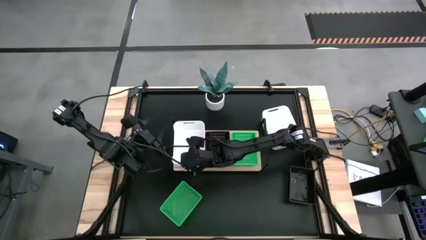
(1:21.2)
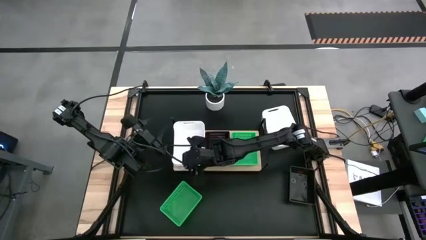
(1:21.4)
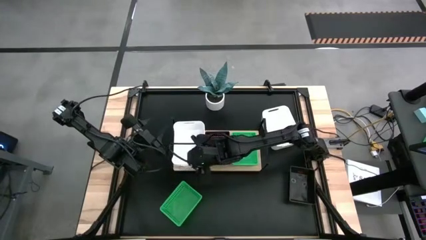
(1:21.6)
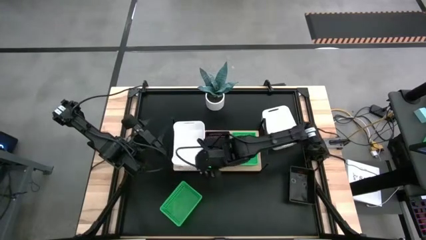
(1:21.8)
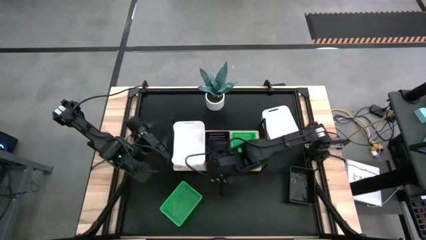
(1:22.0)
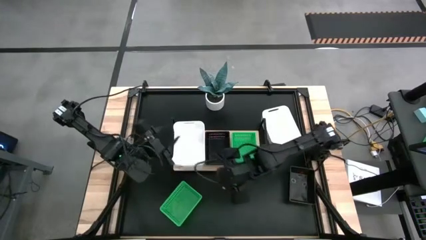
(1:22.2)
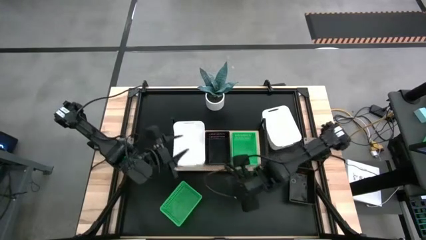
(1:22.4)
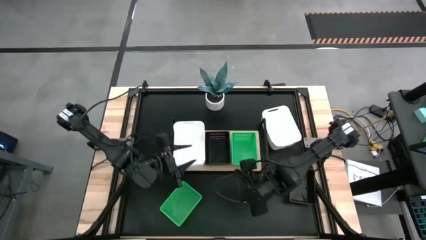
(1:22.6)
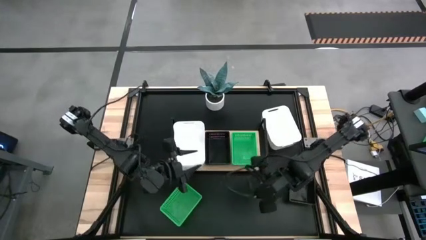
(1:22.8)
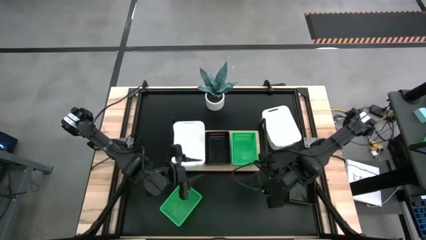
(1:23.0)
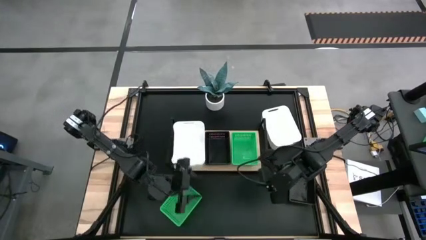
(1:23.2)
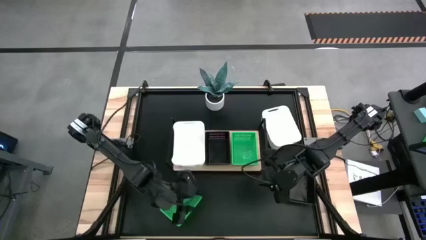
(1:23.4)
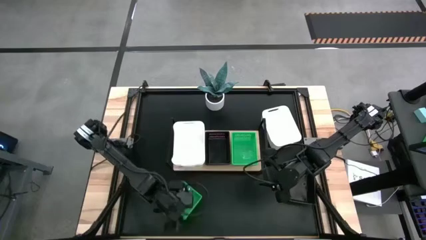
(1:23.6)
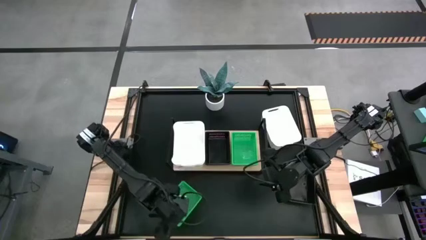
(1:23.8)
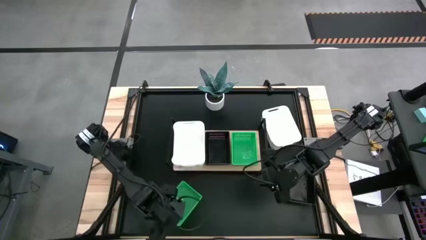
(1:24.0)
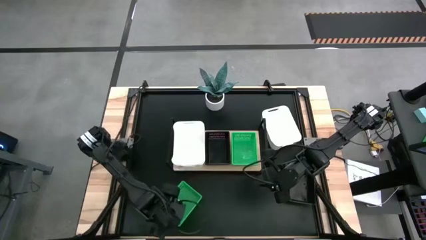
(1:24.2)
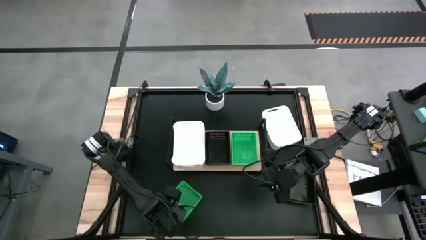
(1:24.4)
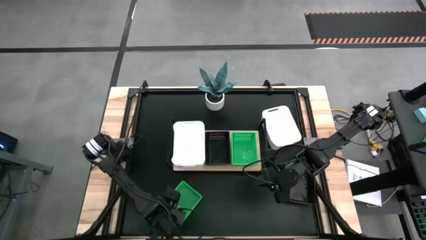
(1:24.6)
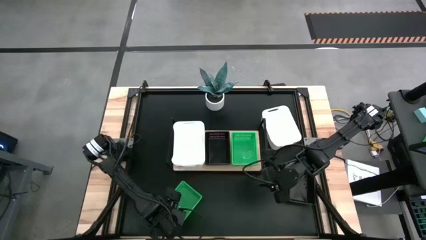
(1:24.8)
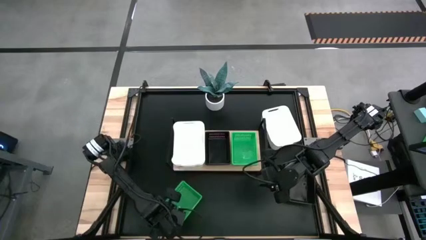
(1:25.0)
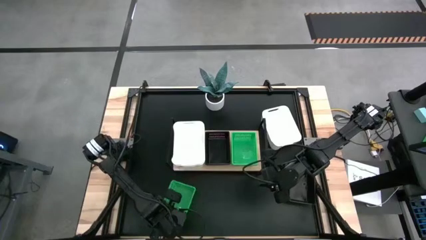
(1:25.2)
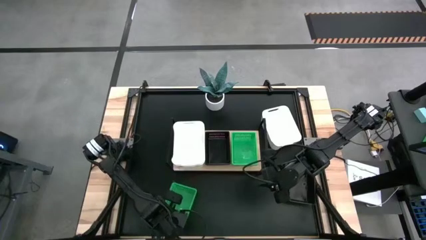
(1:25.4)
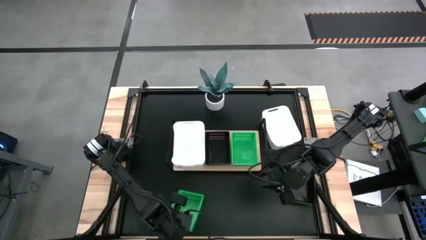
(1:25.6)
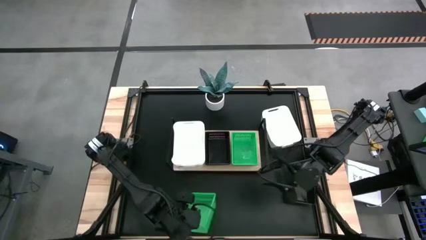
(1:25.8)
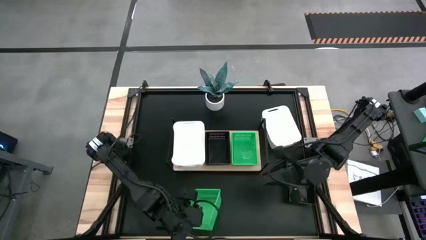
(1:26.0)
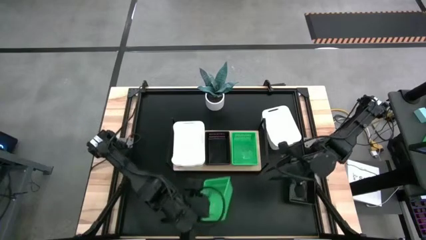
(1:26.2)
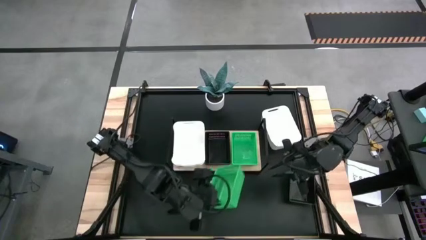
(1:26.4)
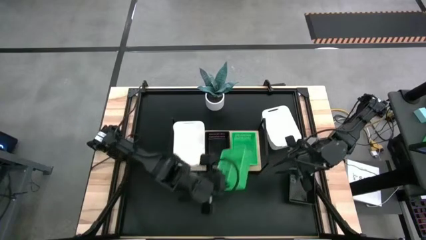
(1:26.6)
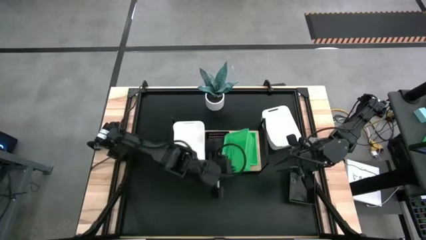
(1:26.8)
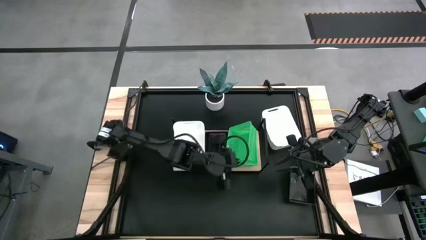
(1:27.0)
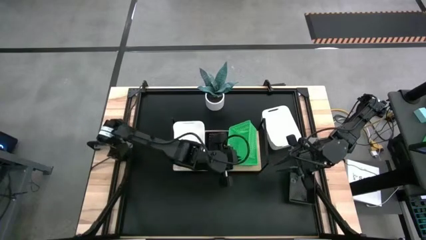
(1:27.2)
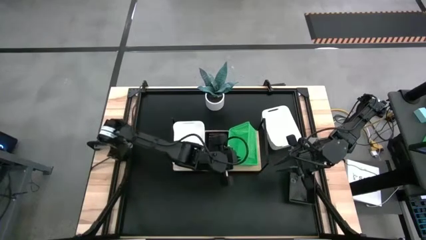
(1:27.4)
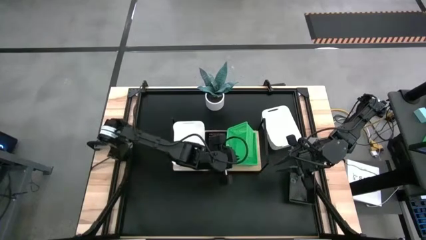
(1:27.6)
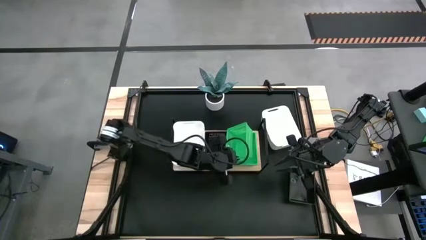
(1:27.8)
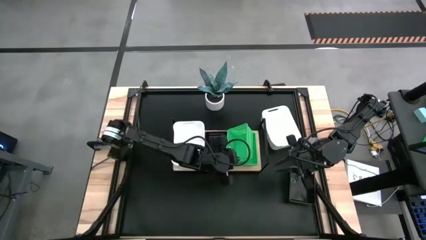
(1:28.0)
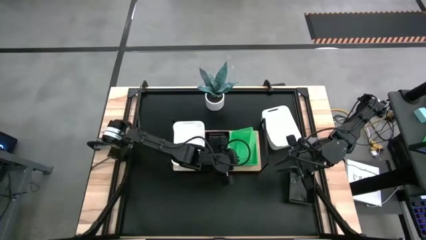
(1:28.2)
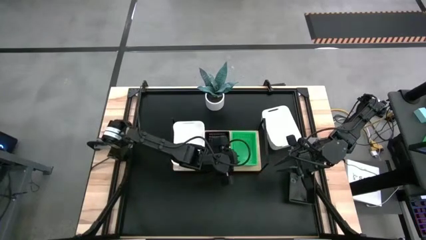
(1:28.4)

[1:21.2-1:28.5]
Task: Stack baskets on shelf by color
Stack the green bin on top of the other green bins on the shelf

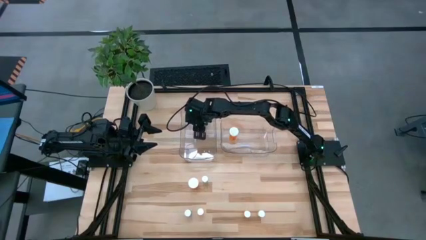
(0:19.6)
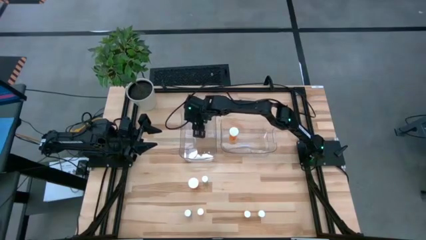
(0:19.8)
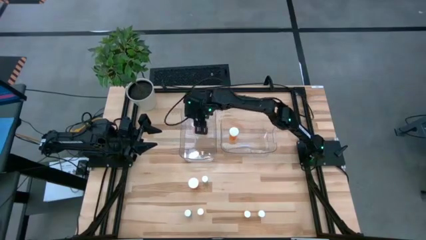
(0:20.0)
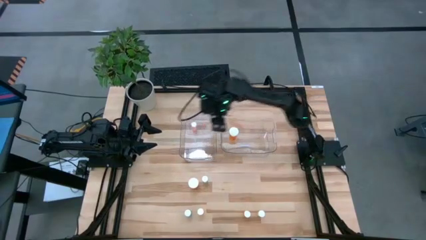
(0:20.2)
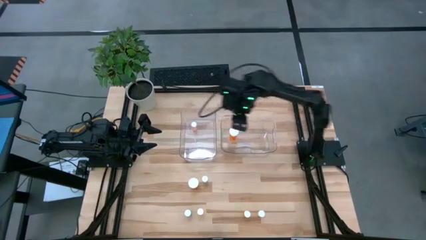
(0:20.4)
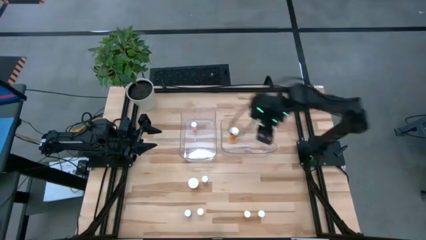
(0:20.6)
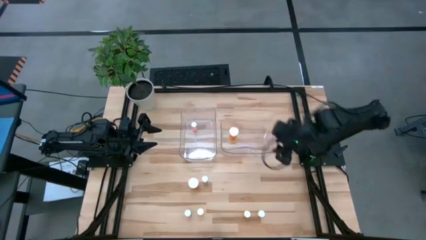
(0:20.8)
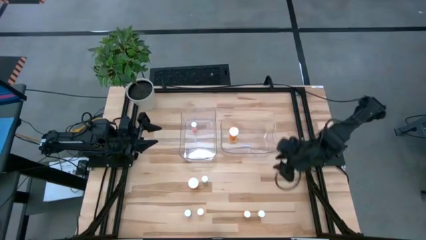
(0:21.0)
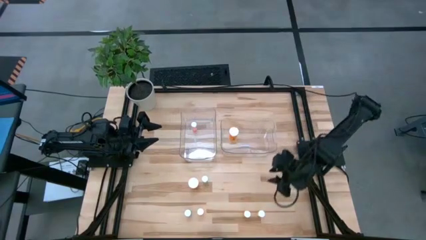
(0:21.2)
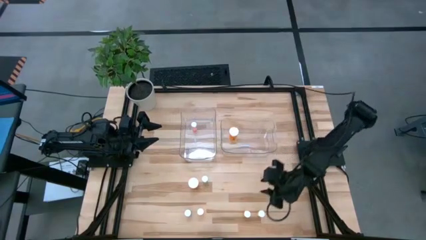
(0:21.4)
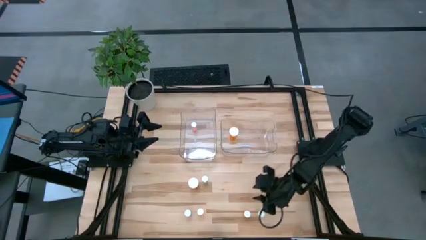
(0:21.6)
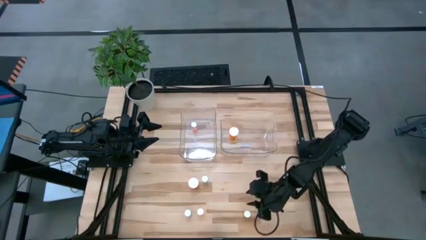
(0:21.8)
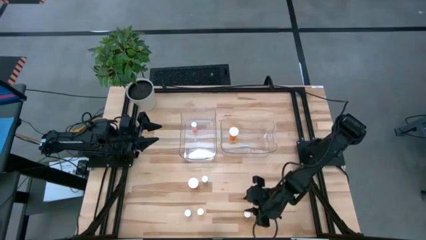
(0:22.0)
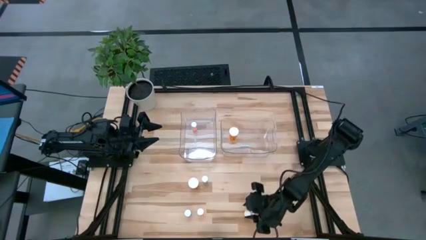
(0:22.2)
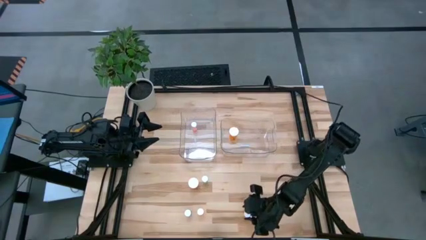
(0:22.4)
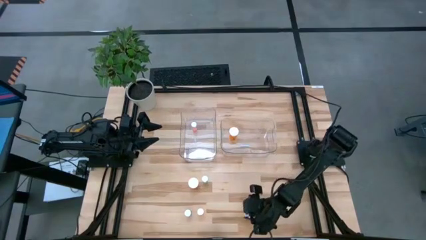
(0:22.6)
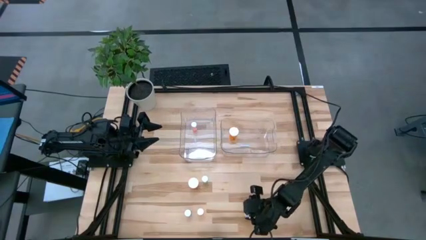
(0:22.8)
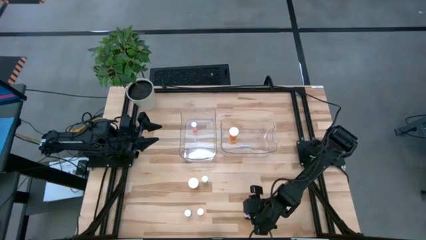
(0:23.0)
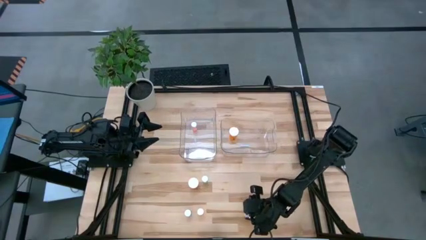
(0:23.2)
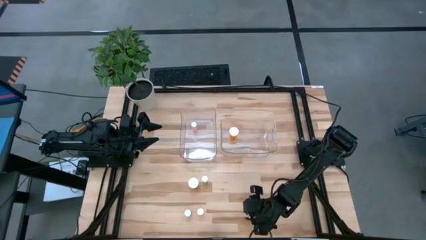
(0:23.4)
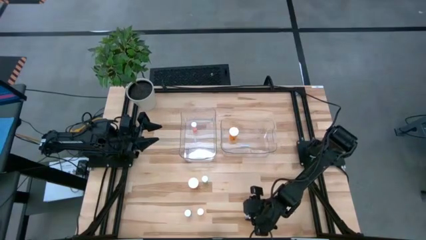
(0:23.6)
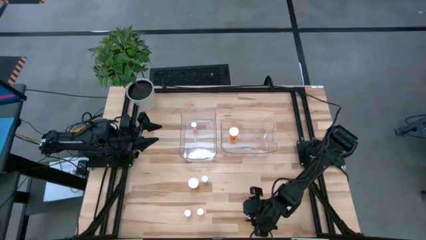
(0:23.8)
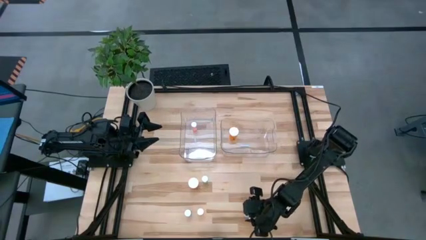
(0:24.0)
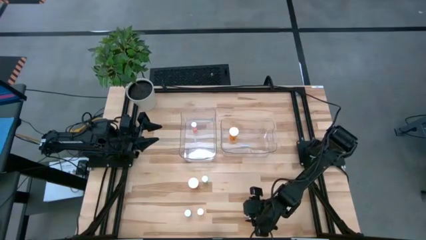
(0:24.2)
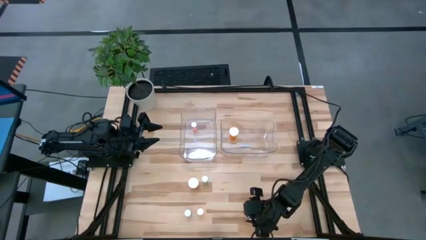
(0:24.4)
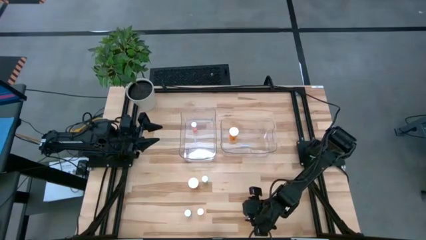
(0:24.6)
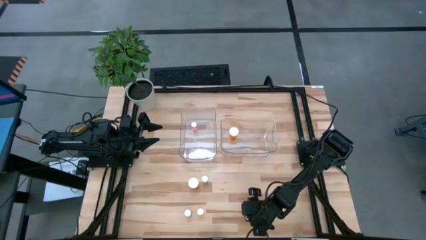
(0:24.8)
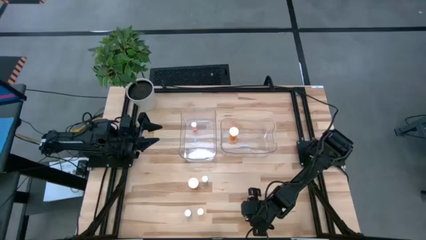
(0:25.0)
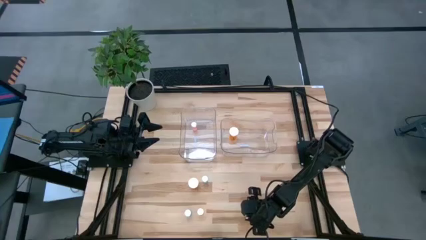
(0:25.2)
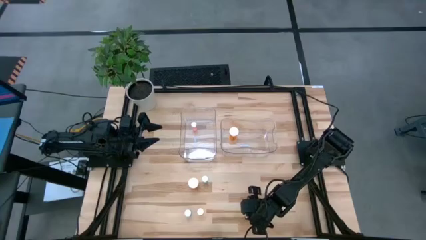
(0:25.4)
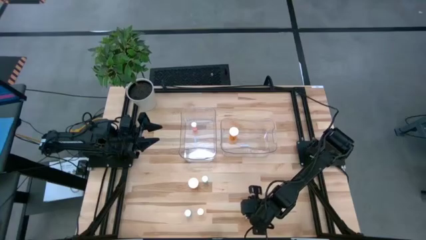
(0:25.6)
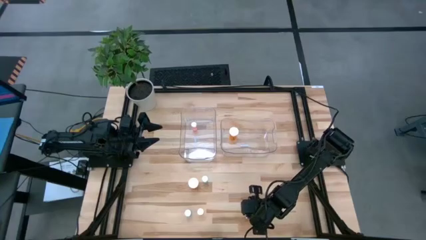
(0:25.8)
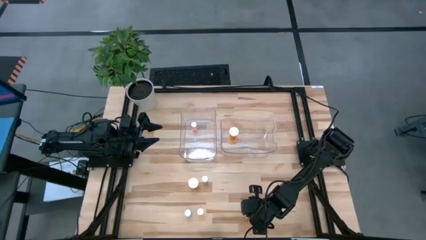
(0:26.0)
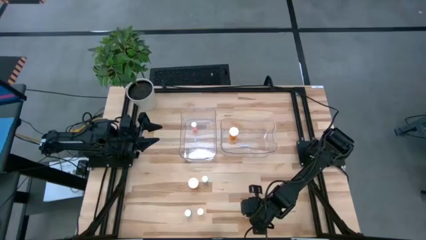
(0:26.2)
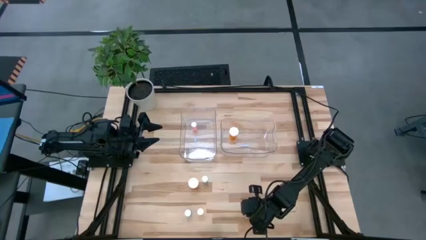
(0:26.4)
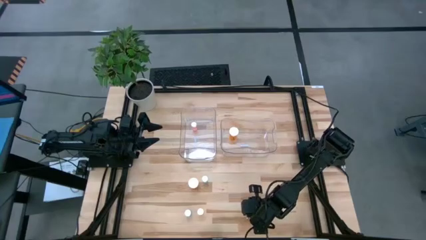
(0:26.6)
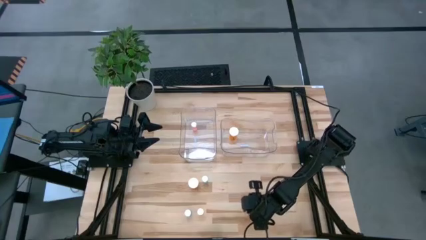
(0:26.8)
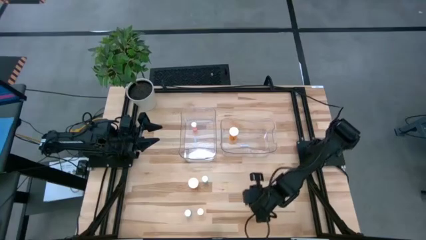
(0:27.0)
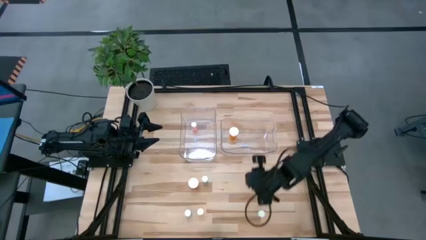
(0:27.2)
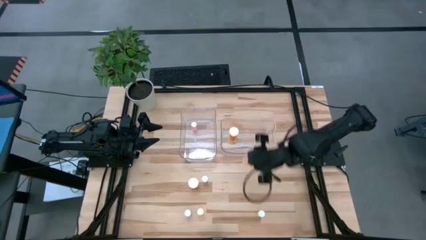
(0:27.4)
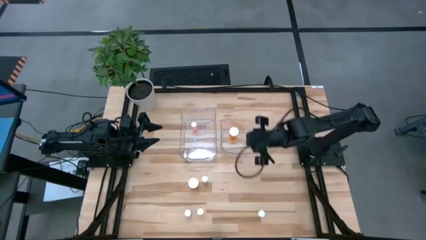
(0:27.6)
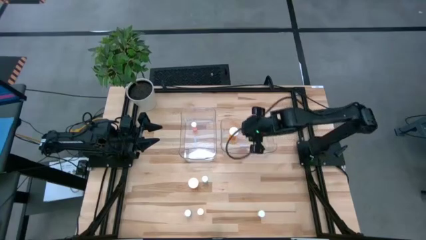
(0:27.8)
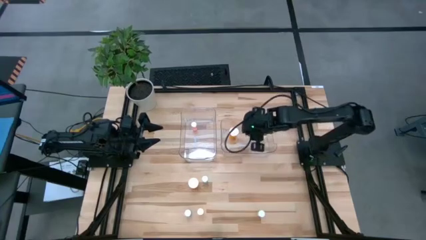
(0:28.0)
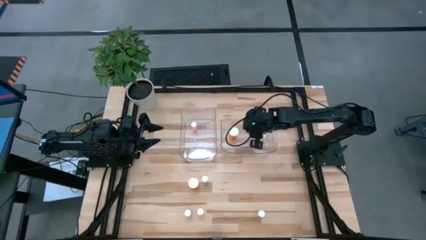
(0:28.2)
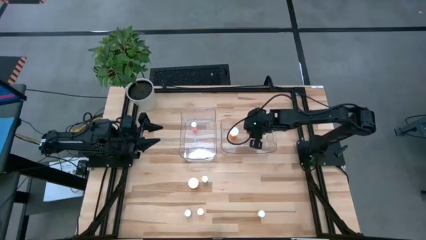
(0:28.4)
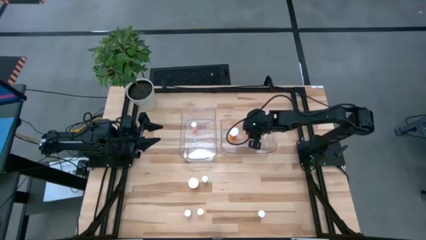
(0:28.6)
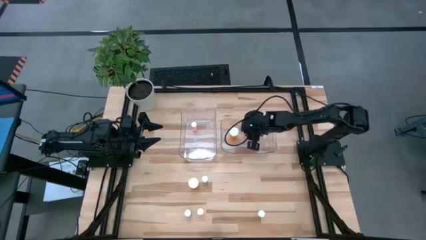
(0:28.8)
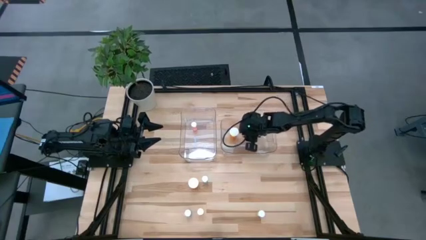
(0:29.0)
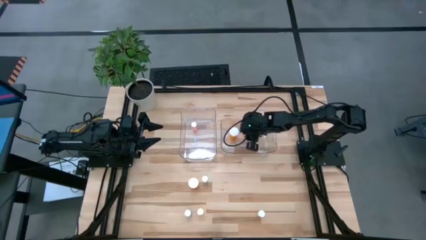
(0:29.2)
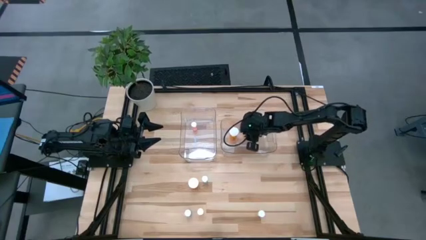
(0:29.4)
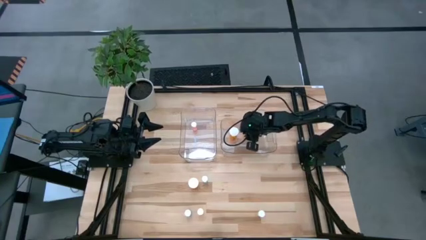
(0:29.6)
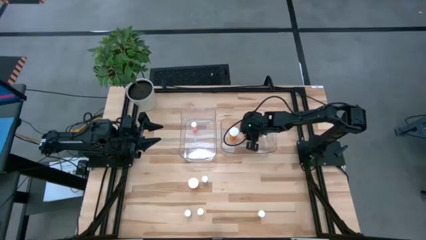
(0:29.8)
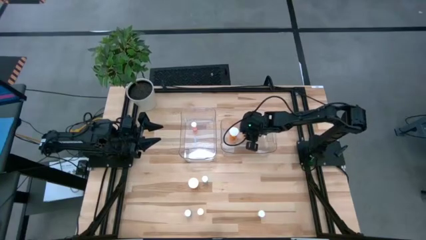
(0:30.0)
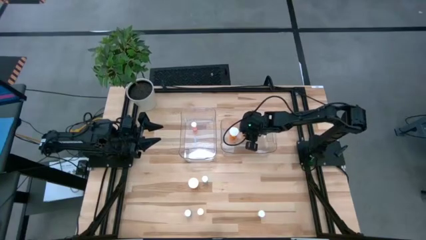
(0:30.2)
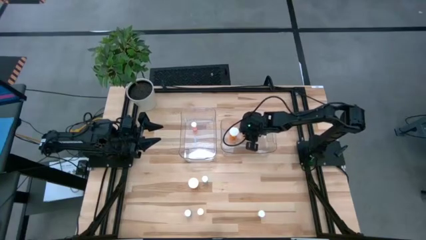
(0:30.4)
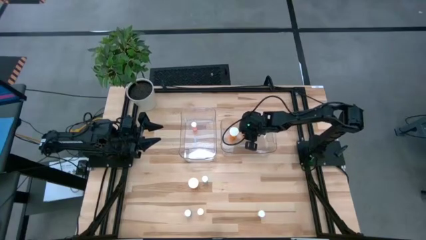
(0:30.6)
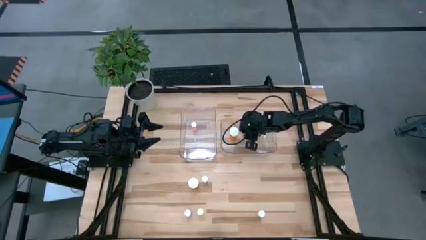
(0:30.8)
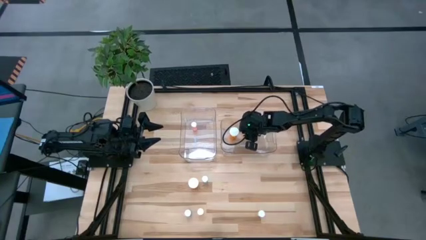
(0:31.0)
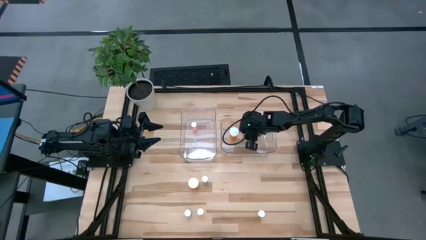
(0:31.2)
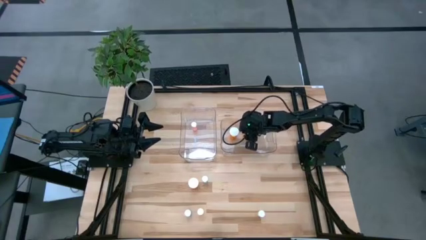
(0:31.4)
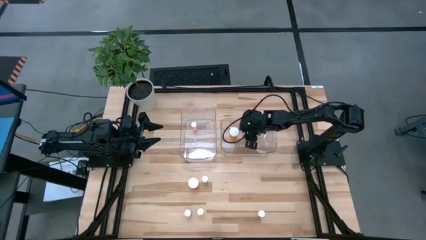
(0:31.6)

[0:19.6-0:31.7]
Task: Pick and place medicine bottles into bin by pill shape (circle, oval)
Put the right small orange pill bottle into the right transparent bin
